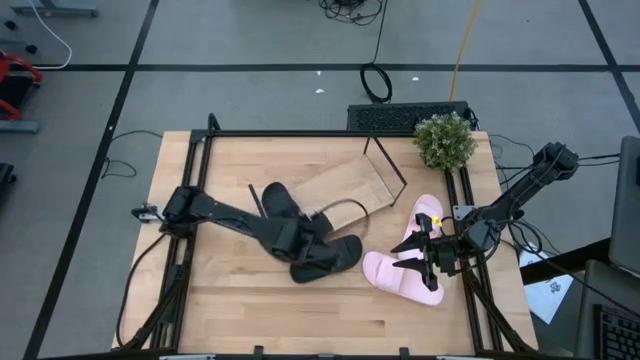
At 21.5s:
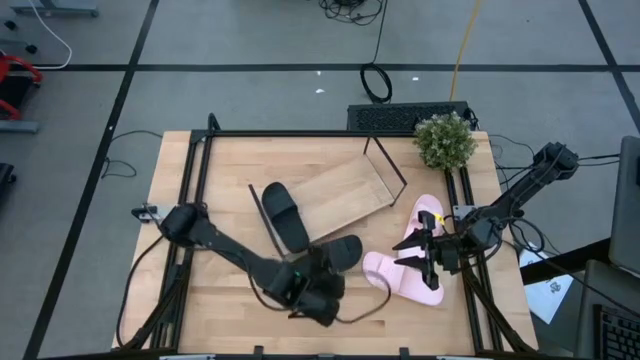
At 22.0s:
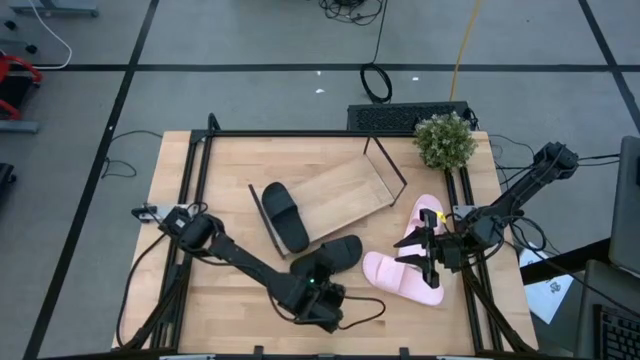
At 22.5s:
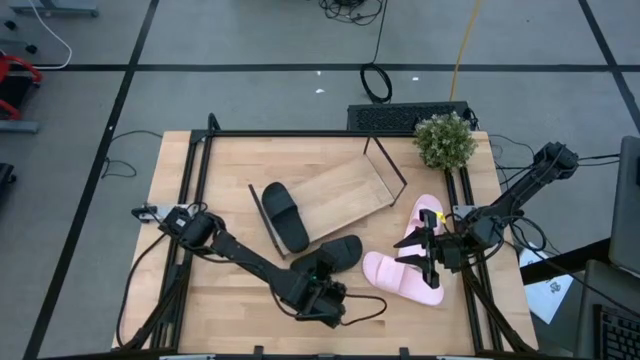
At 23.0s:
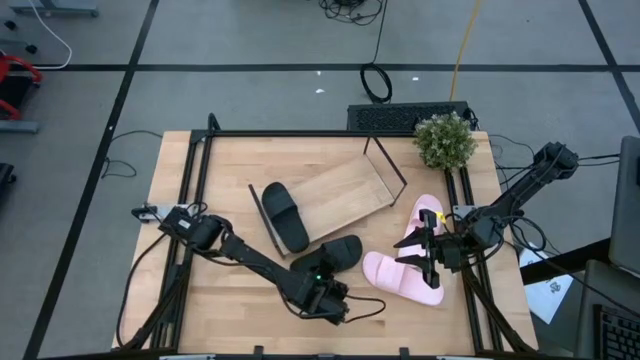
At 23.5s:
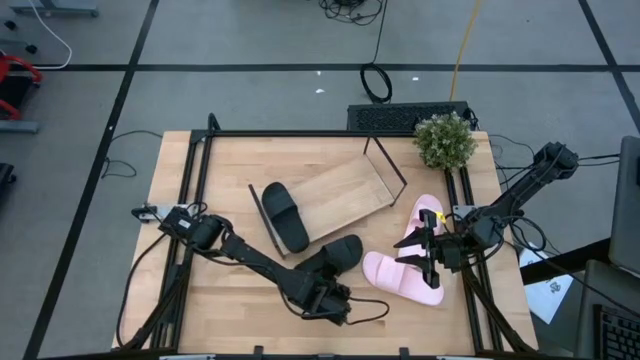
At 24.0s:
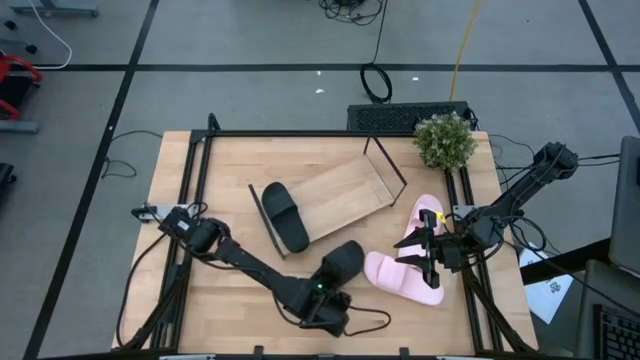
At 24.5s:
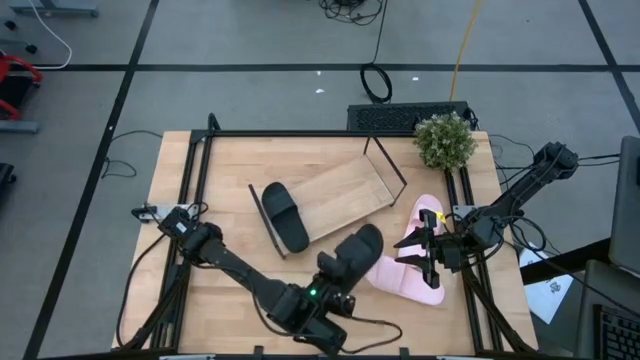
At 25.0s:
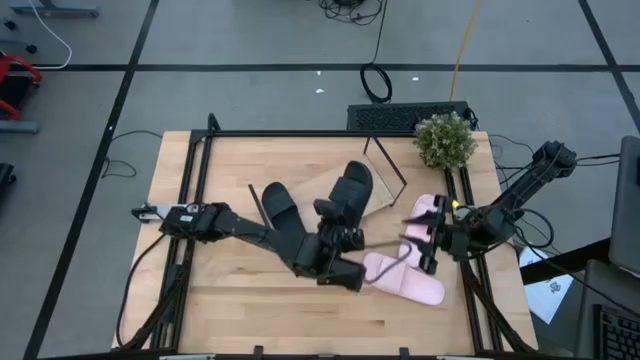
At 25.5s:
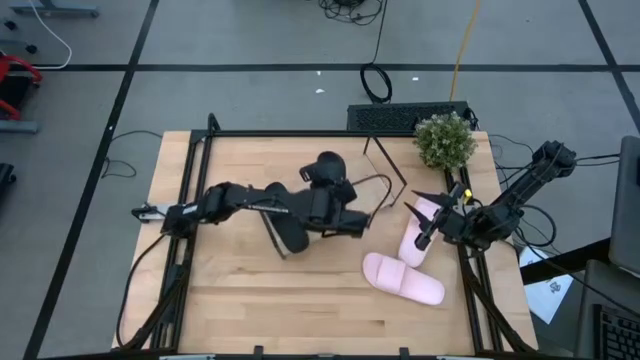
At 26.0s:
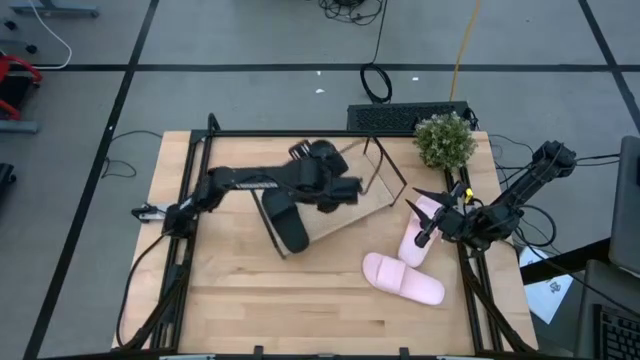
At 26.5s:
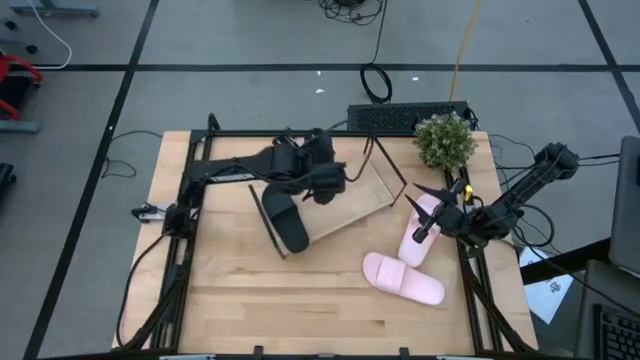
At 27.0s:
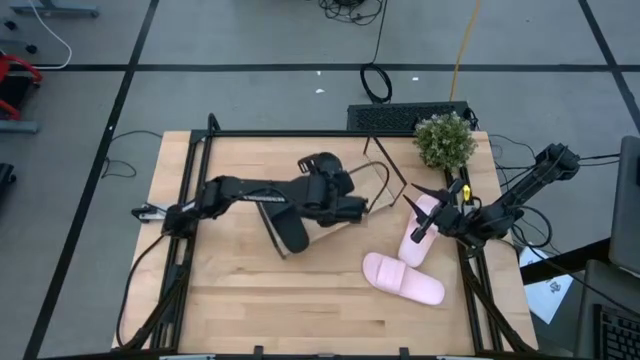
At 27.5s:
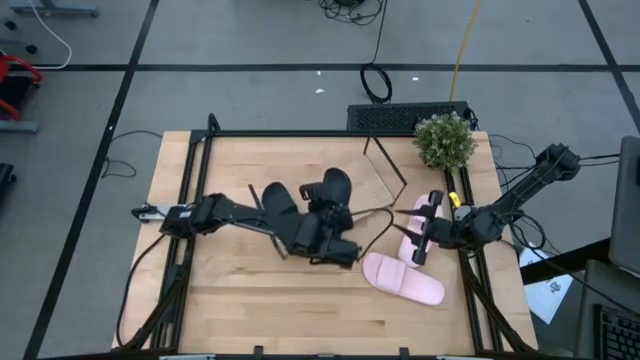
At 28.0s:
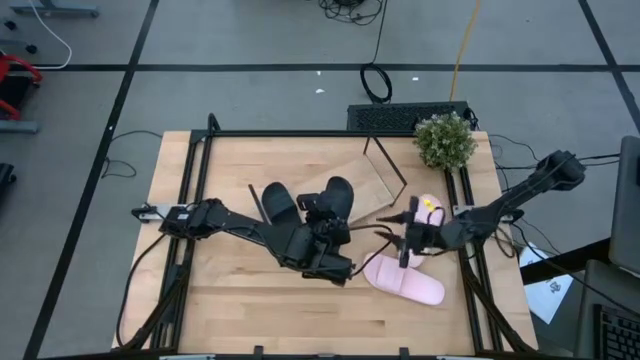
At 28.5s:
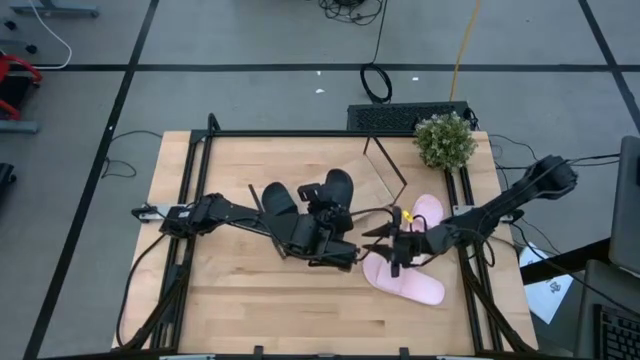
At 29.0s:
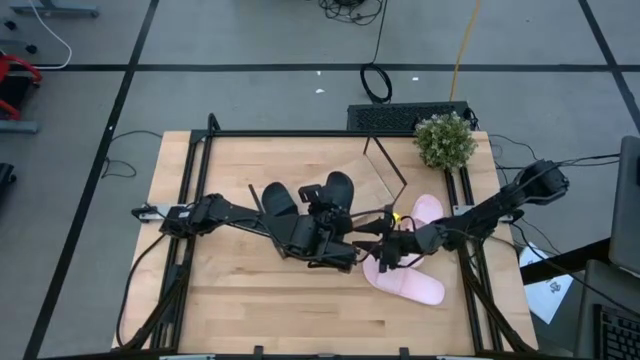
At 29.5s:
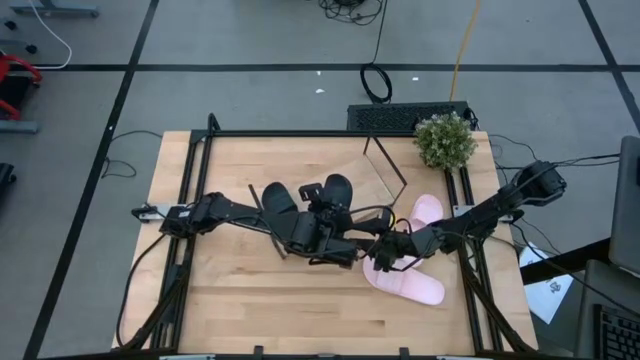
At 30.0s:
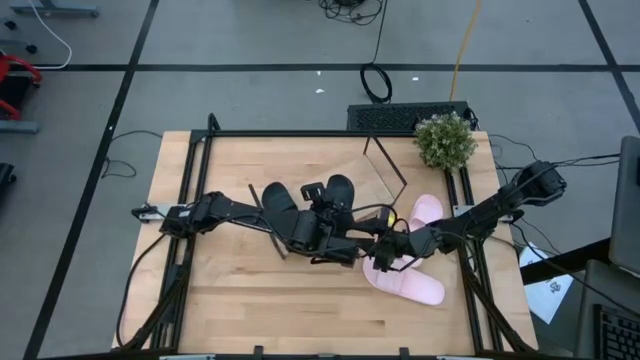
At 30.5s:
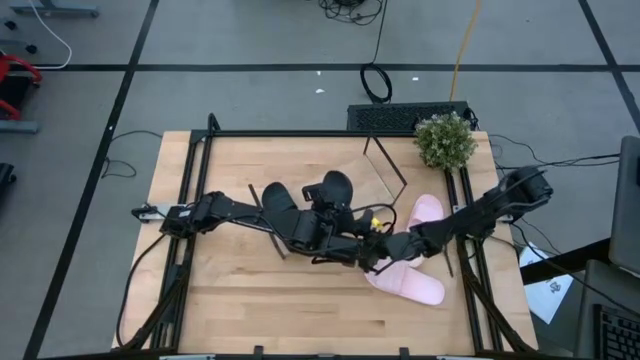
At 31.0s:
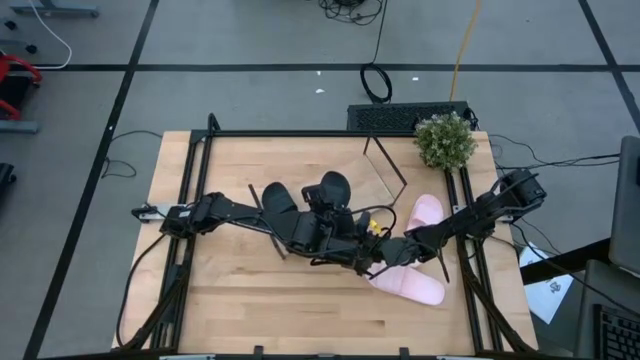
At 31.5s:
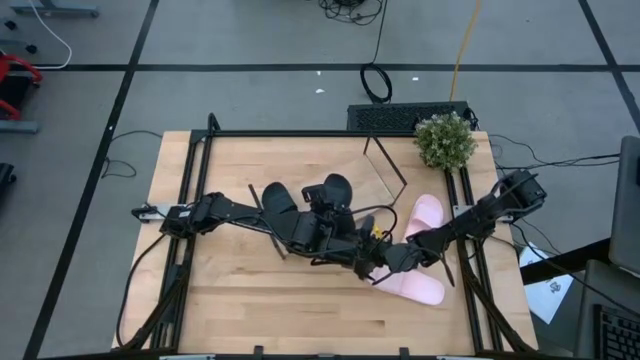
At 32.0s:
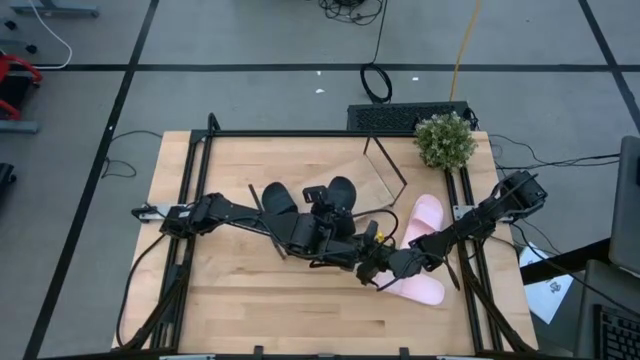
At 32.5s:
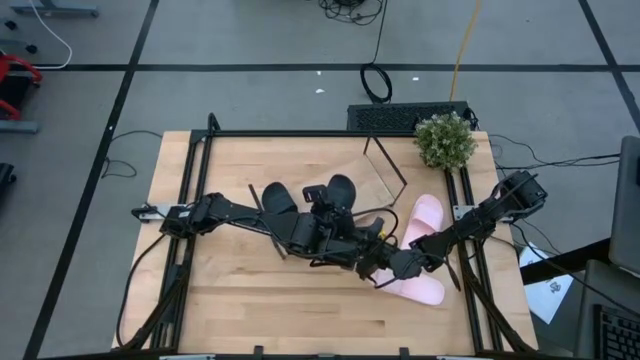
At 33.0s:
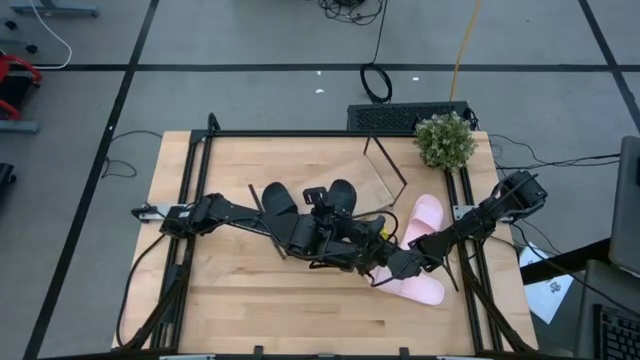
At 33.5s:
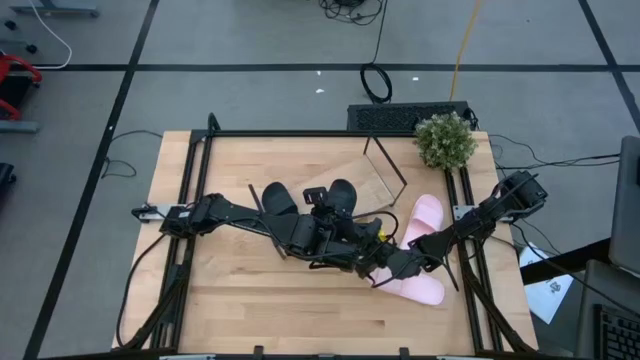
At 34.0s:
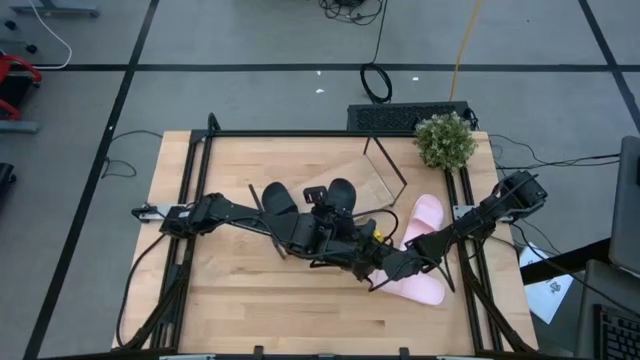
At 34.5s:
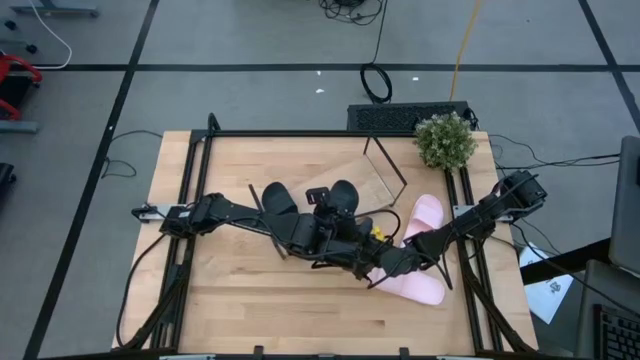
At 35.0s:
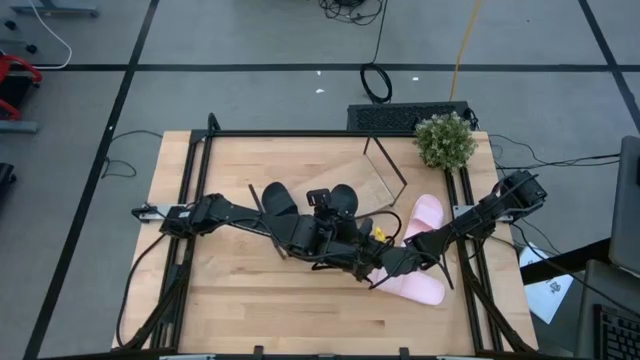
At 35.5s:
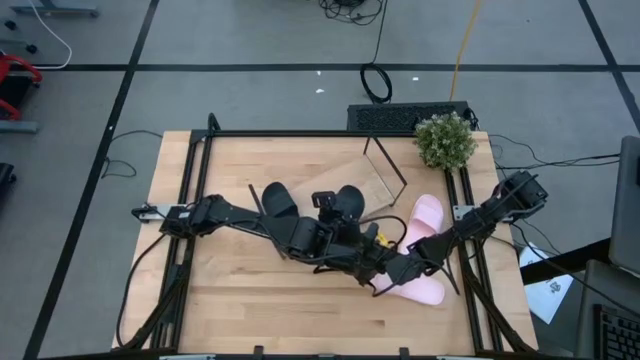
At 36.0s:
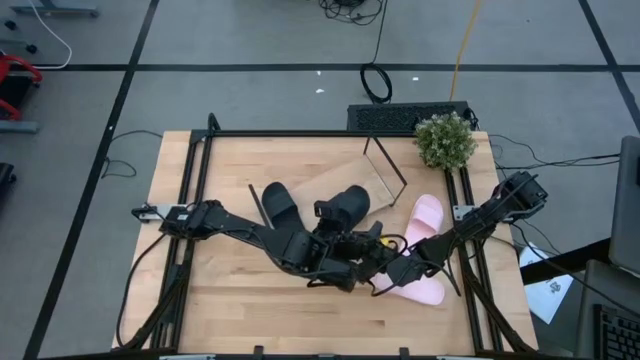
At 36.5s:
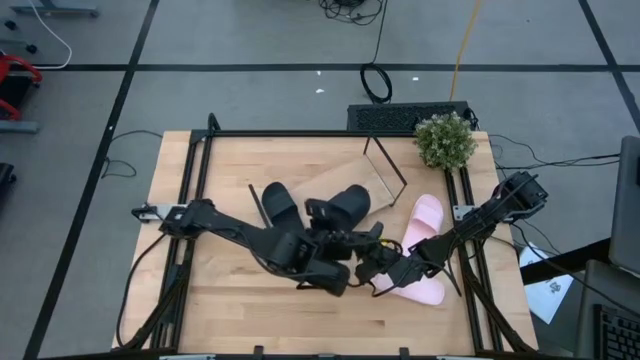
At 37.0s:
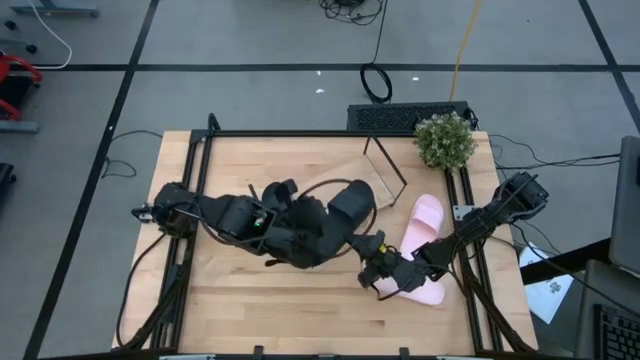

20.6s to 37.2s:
Task: Pick and place slides into the shelf
Put the black slipper on the shelf

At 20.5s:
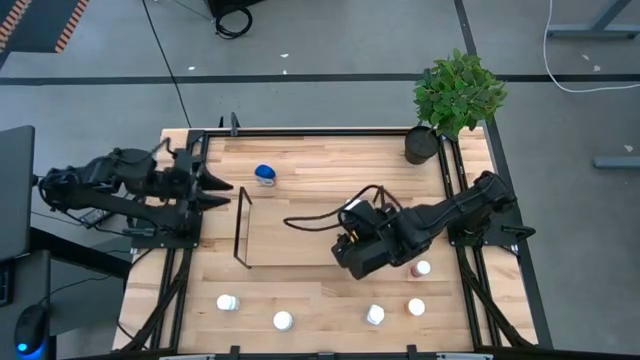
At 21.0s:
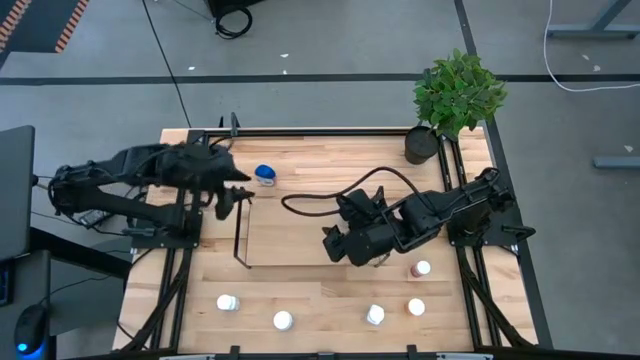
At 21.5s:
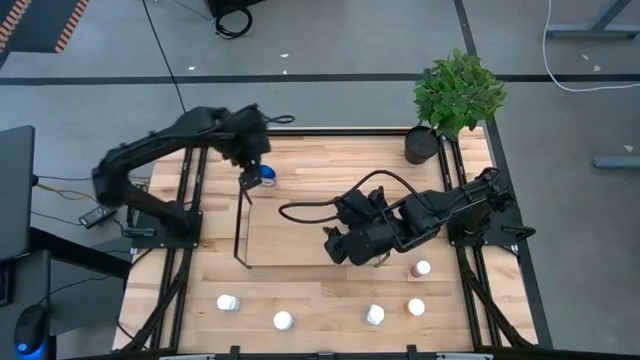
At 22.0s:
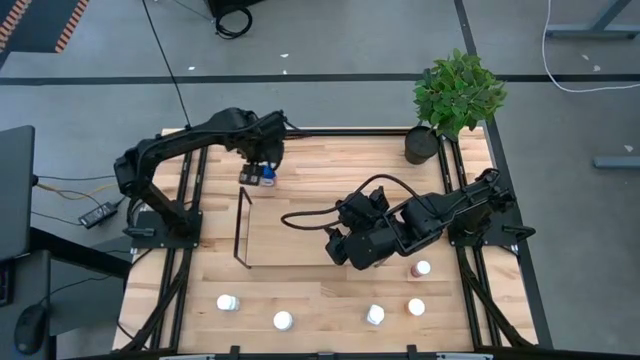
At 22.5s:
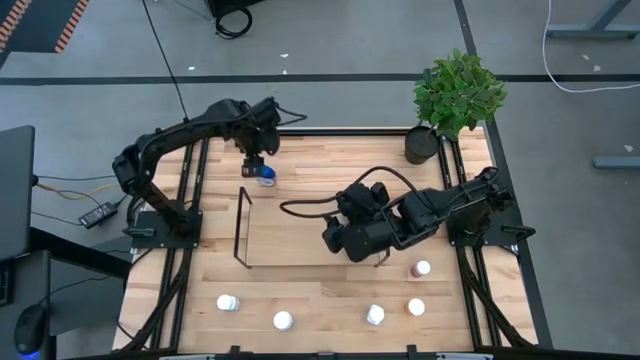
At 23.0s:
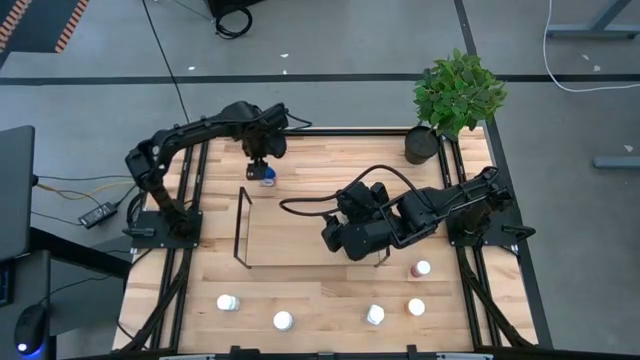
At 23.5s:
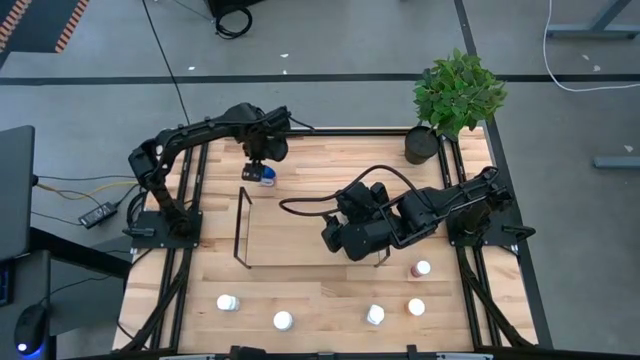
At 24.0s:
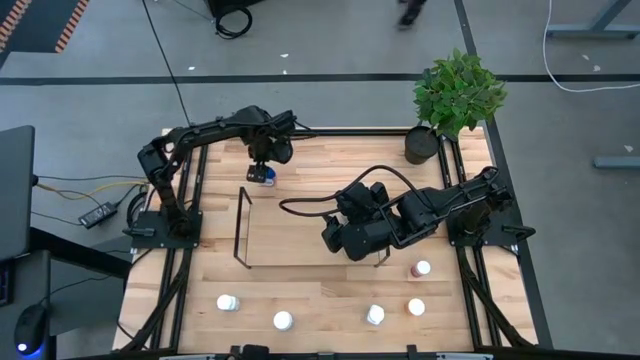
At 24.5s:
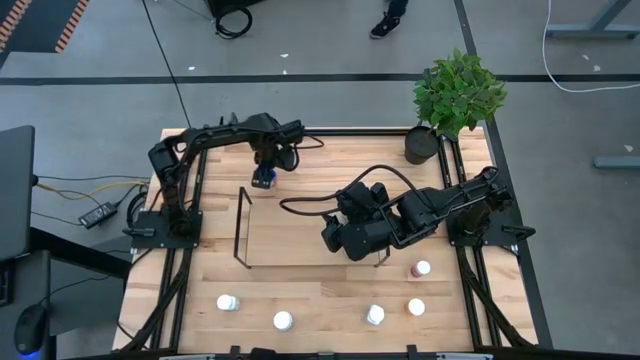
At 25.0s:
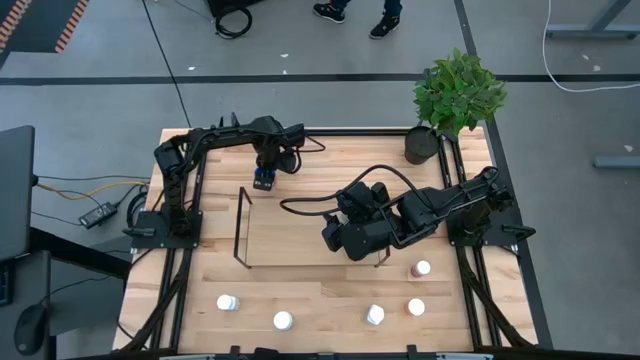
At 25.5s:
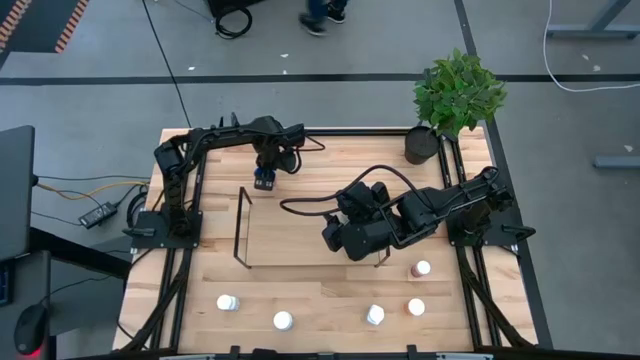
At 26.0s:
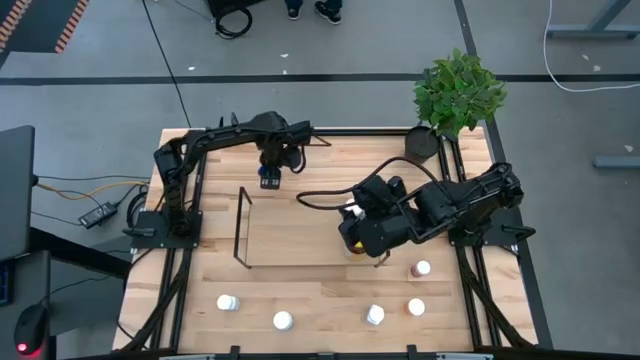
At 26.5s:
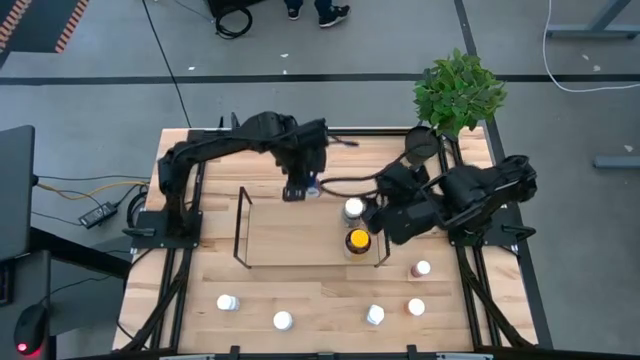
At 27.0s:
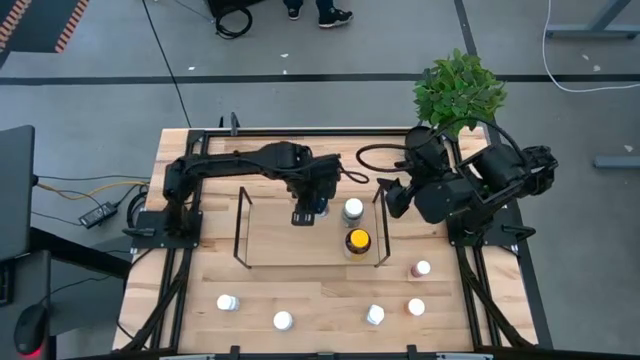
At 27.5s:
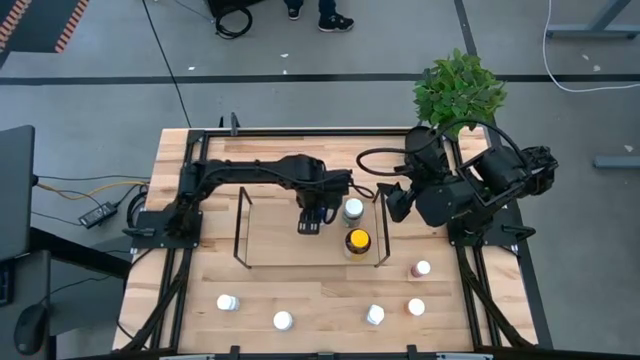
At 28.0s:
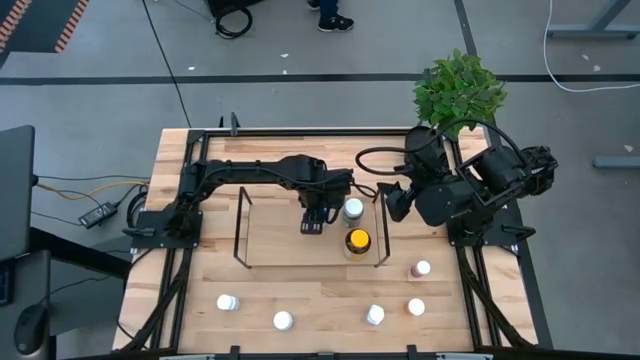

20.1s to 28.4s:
Task: Pick and place medicine bottles onto shelf by color
Put the blue medicine bottle on the shelf
